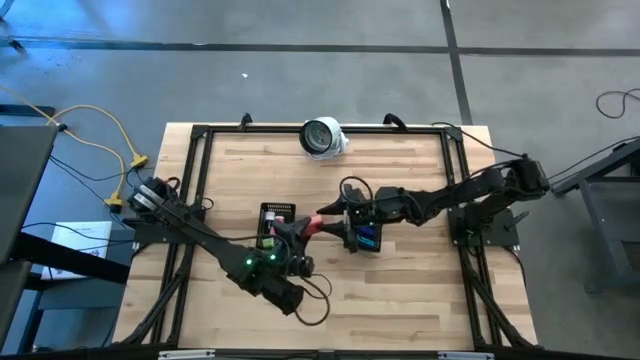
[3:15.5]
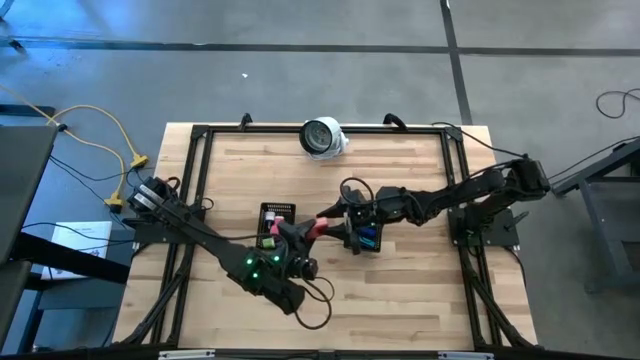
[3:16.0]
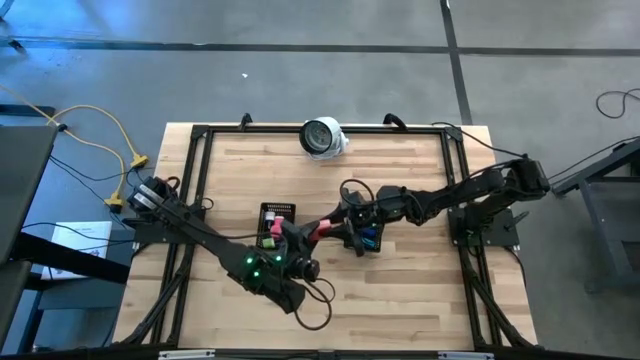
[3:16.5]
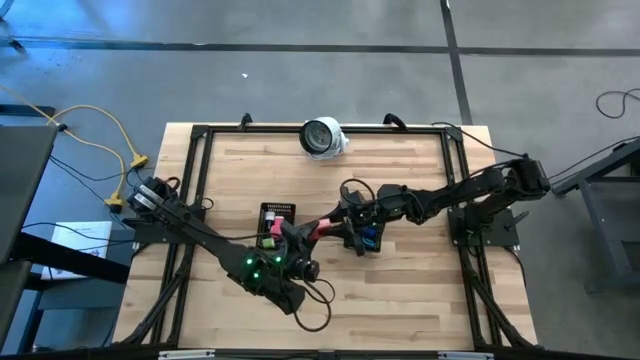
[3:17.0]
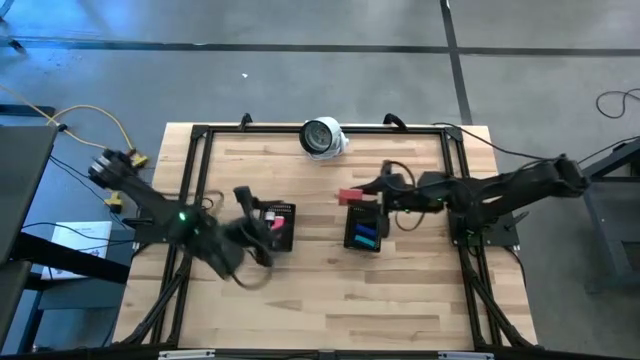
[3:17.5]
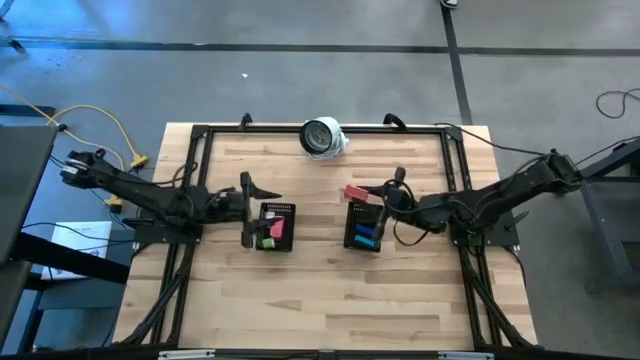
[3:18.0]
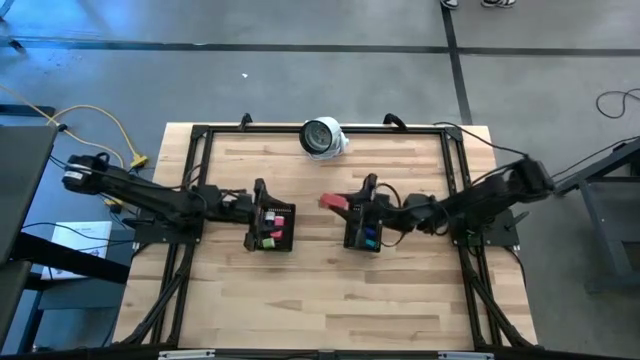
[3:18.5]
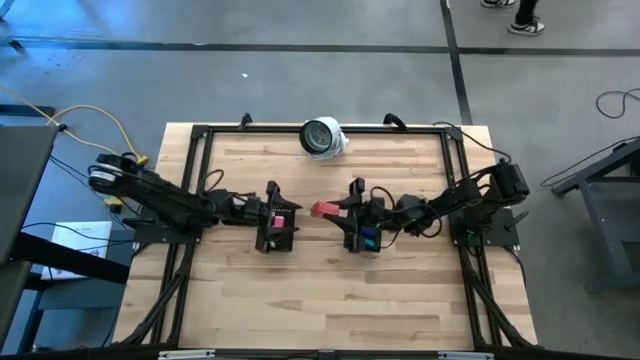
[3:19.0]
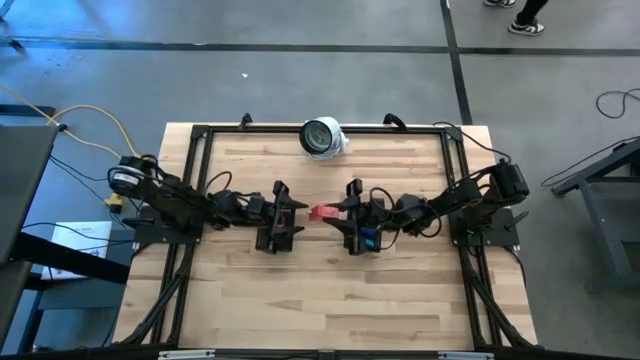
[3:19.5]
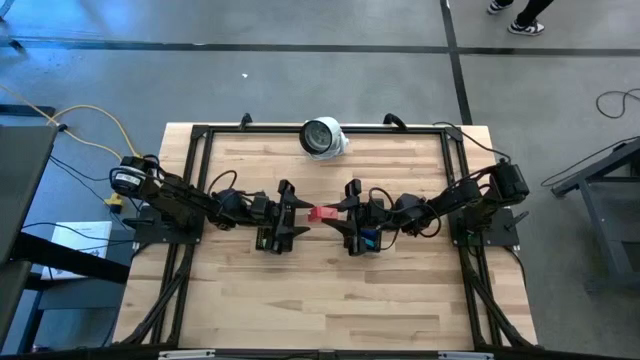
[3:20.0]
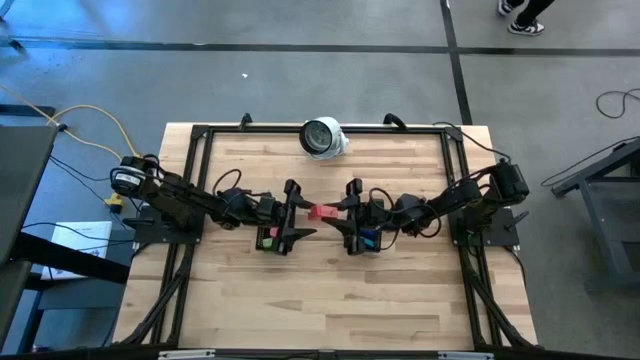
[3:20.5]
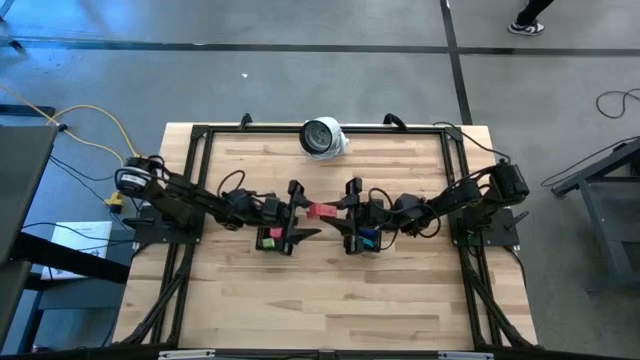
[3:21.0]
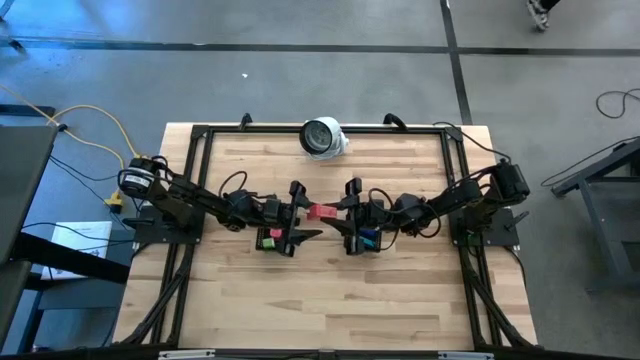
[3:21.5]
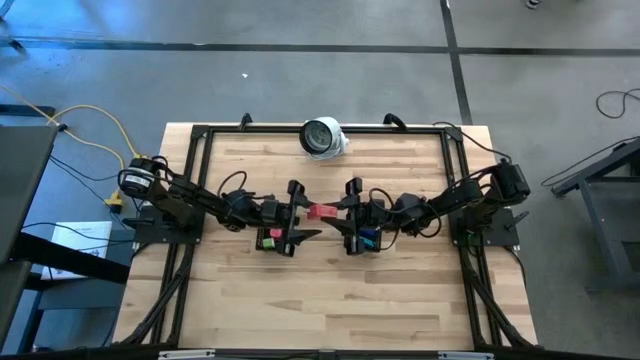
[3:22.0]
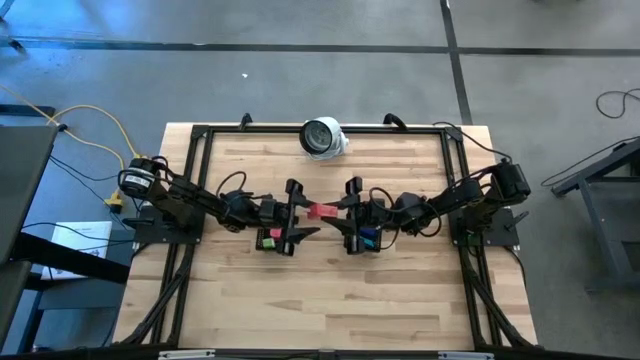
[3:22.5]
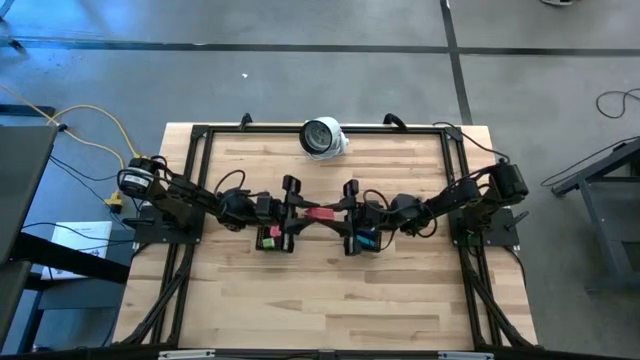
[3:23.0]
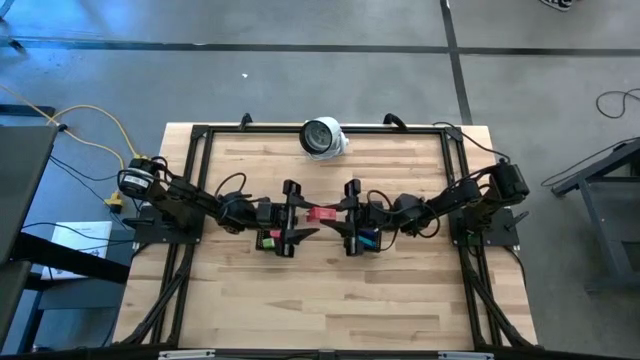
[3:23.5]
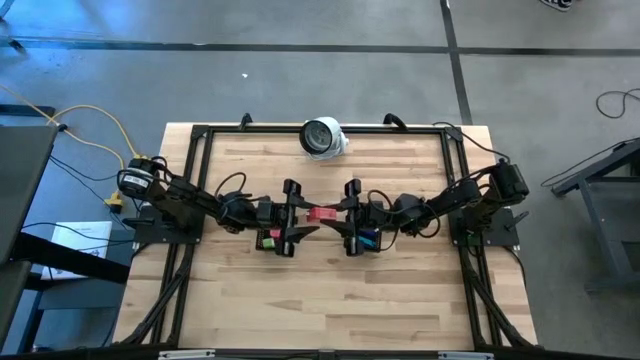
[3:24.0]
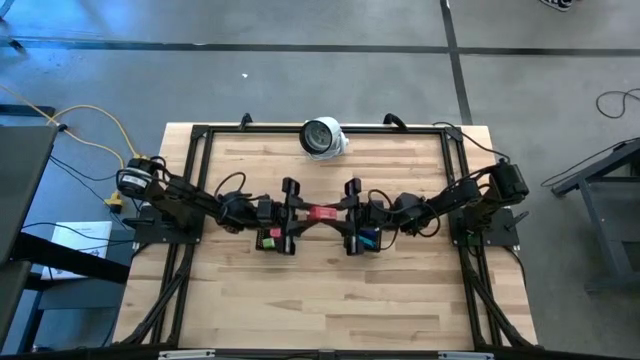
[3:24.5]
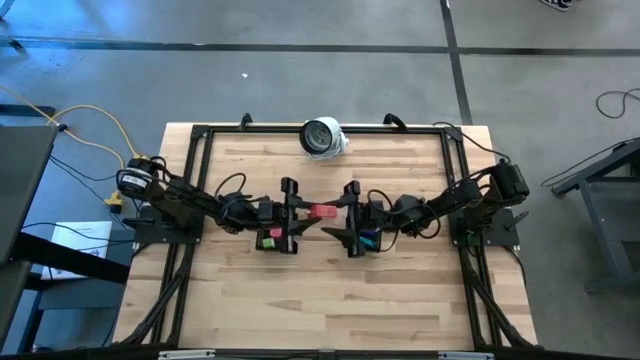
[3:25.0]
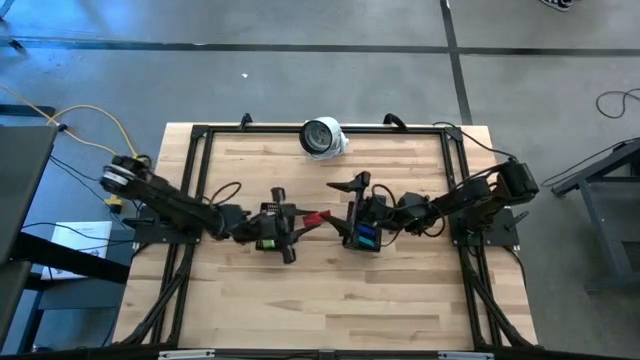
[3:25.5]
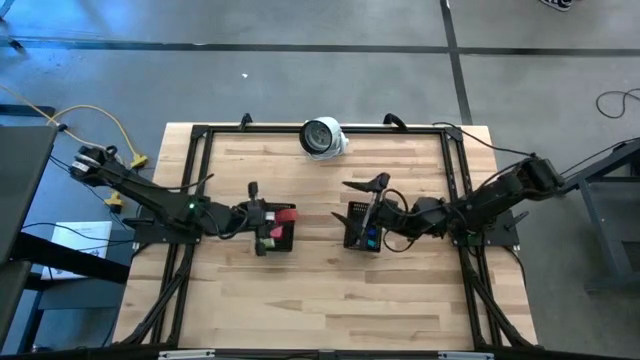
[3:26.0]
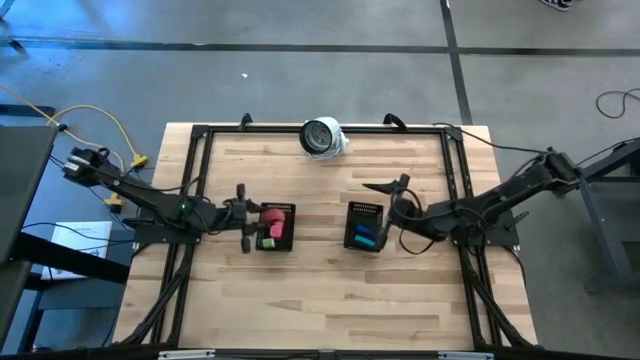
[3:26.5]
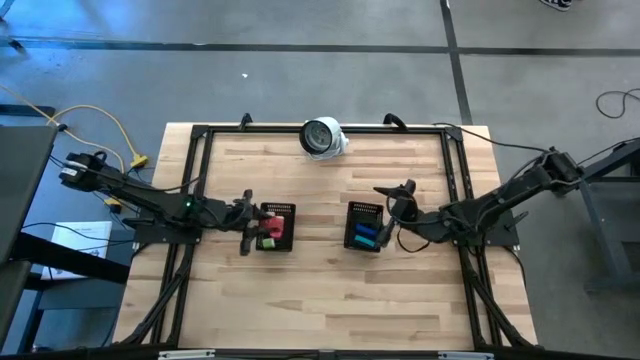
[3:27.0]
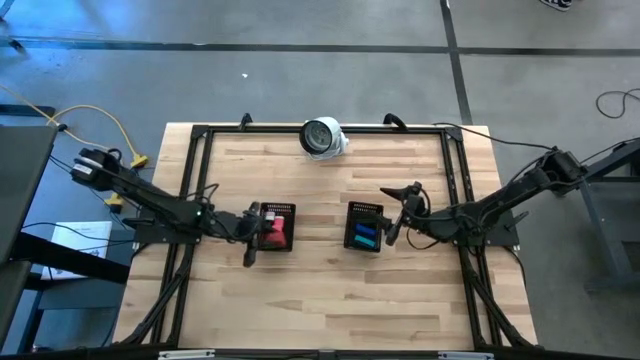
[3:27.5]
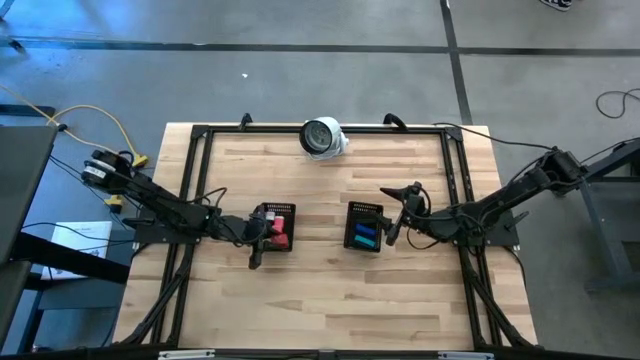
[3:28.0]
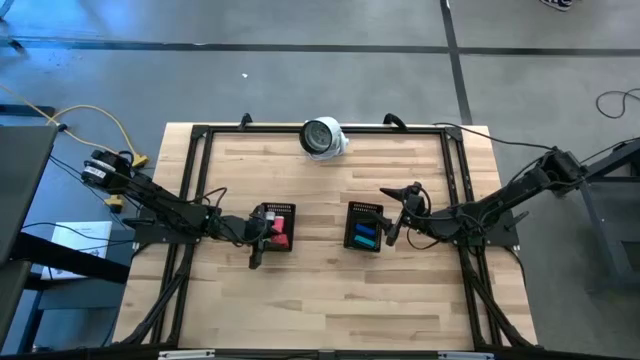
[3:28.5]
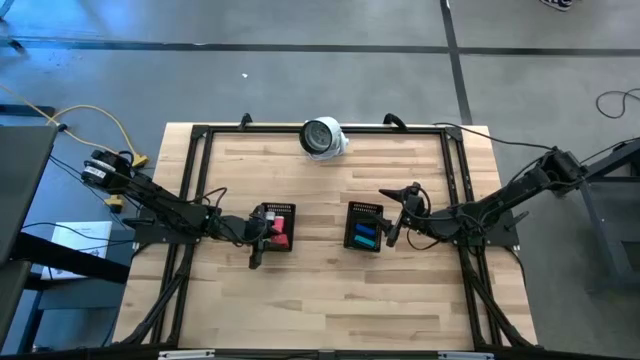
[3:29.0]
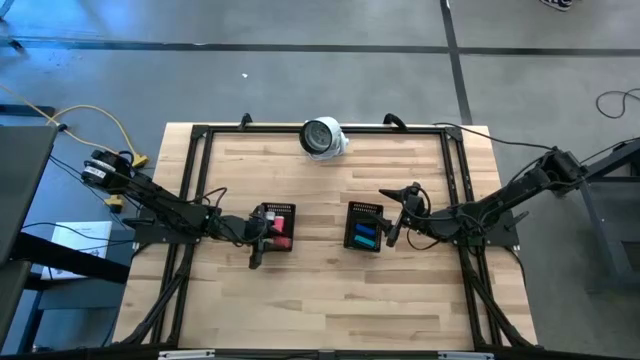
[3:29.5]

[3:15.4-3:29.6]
Task: Pick & Place Office items
Put the red charger adapter into the left black bin

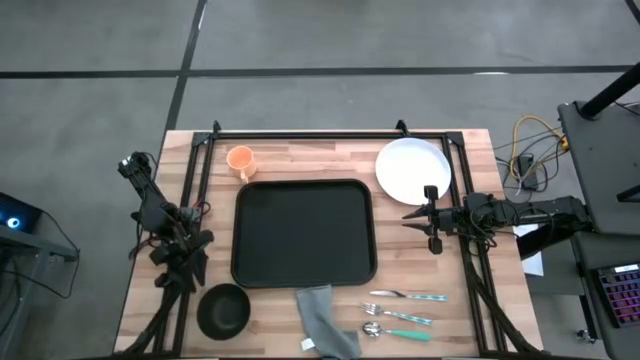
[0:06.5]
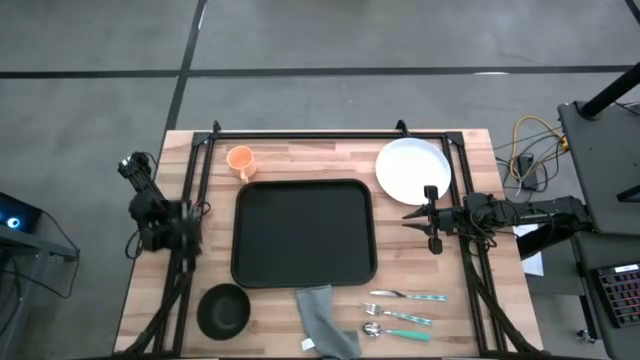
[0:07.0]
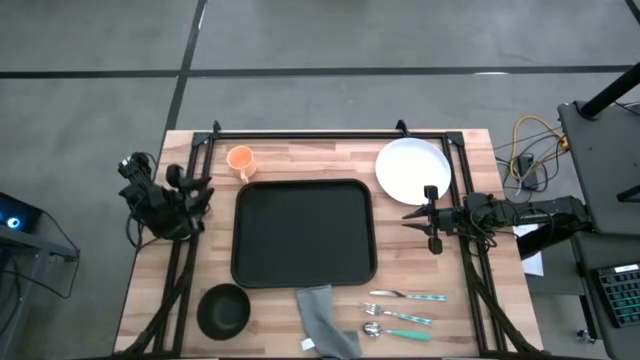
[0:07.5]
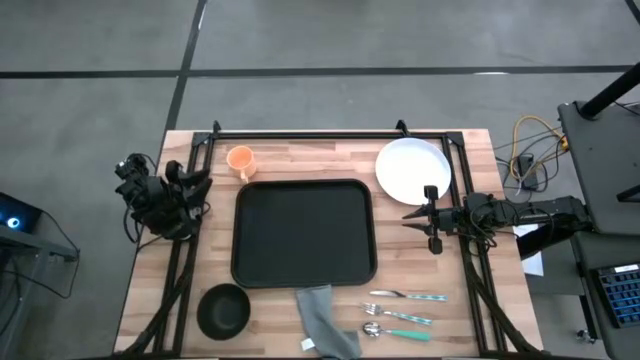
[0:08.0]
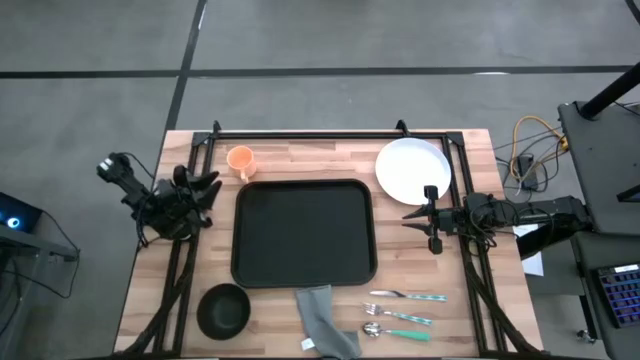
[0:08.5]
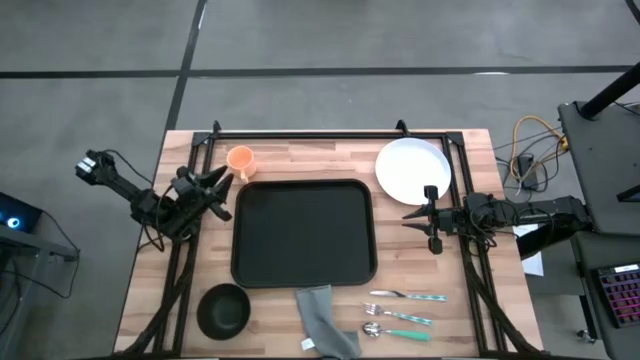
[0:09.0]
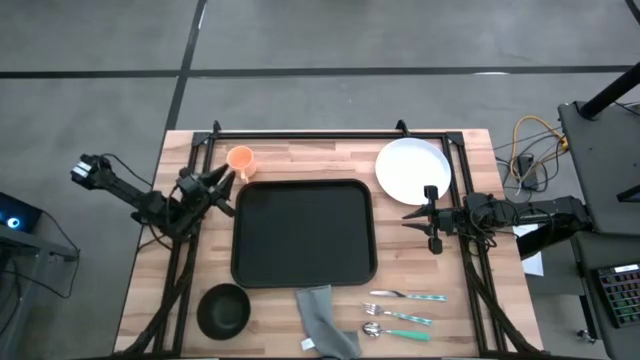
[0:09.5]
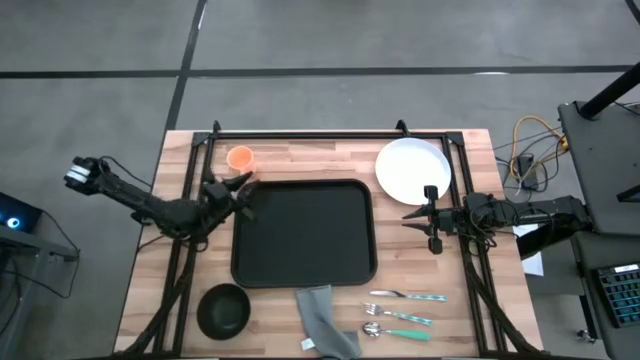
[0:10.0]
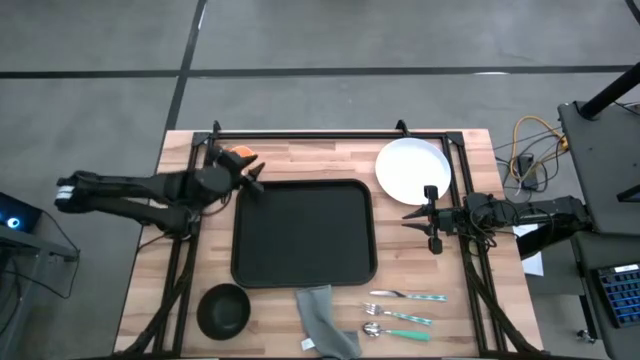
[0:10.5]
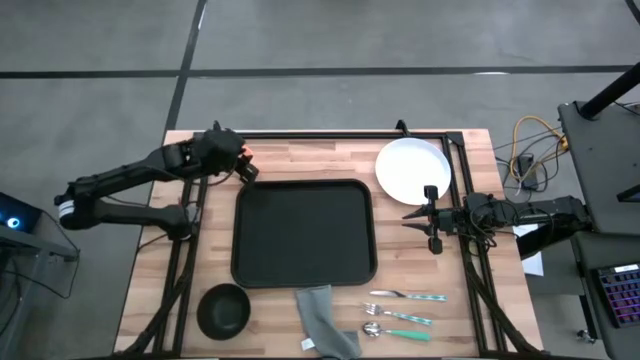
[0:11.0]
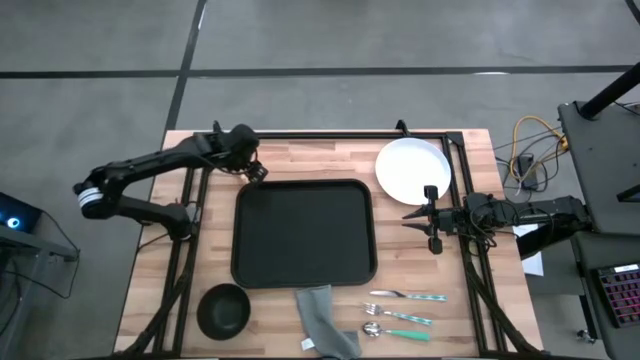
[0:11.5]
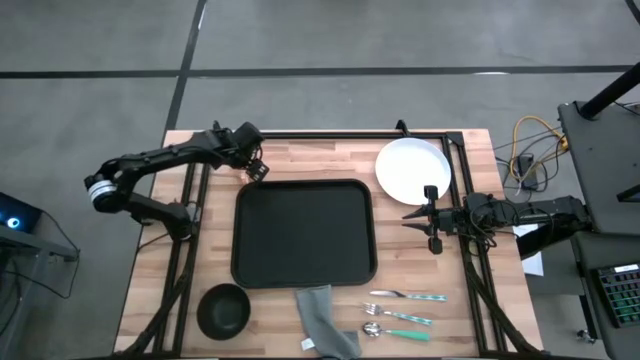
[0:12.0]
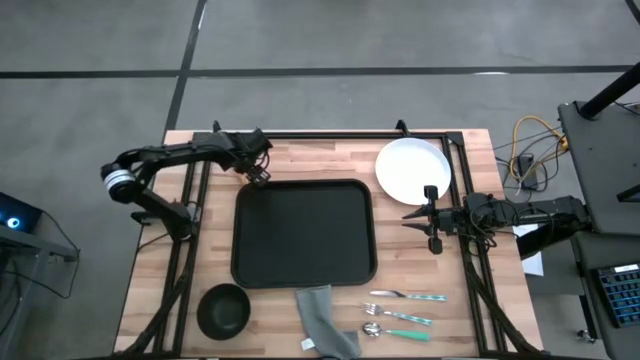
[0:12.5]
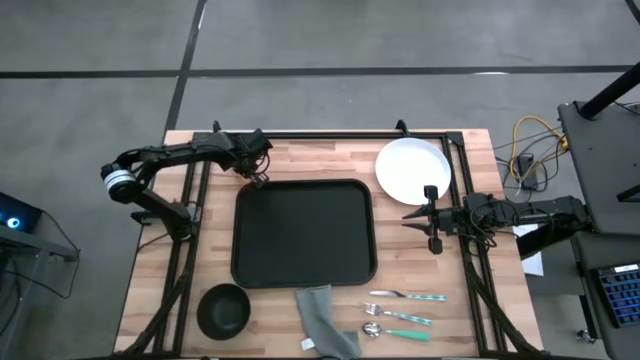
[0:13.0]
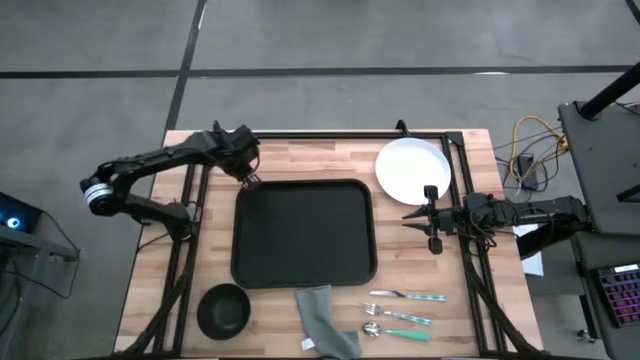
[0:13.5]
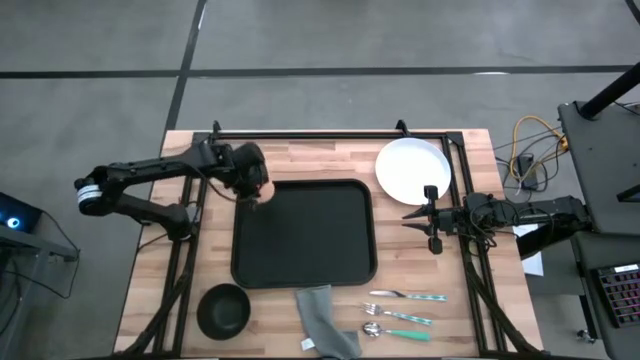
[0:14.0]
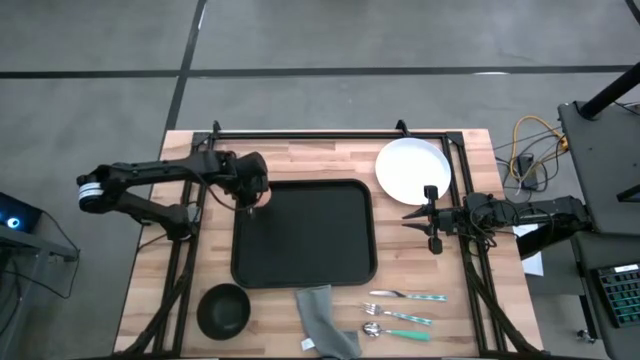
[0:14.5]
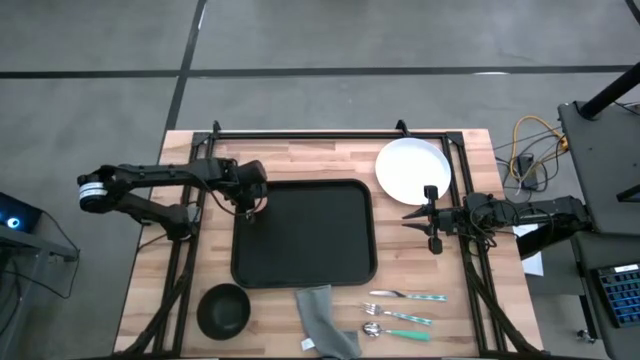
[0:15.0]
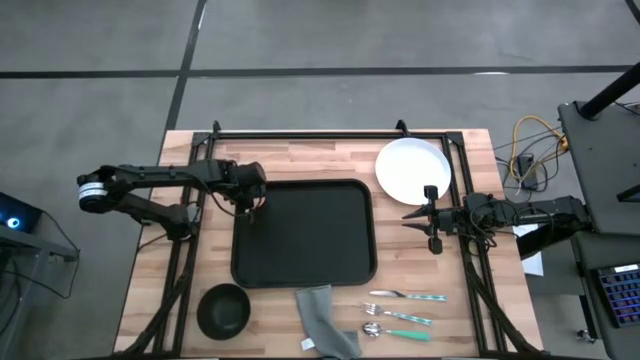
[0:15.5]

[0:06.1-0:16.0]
Task: Set up tray
Put the orange mug on the black tray
